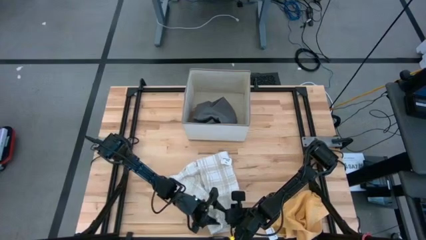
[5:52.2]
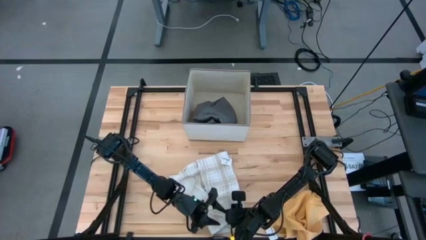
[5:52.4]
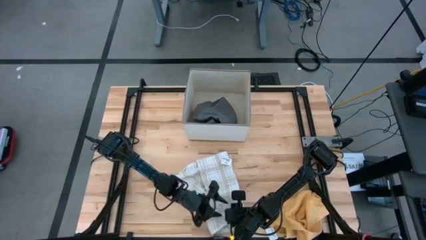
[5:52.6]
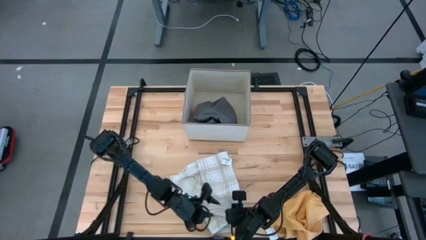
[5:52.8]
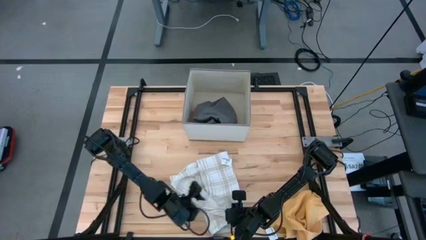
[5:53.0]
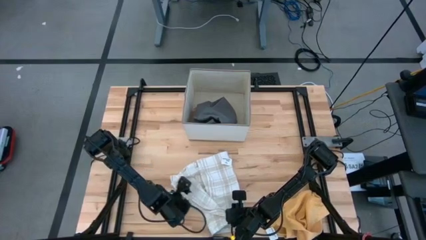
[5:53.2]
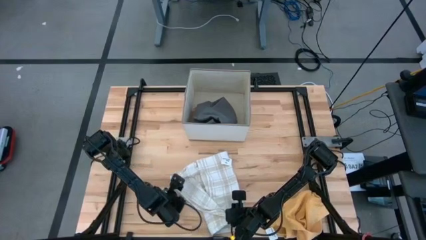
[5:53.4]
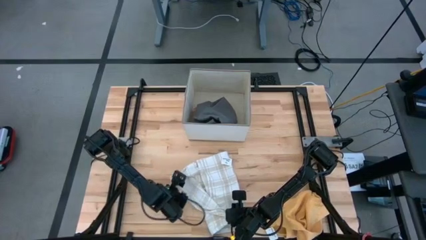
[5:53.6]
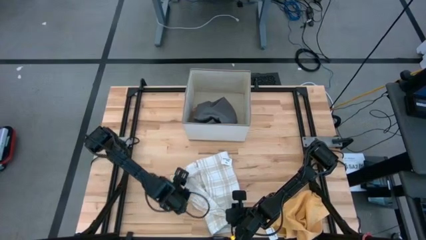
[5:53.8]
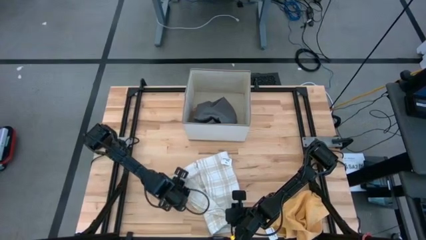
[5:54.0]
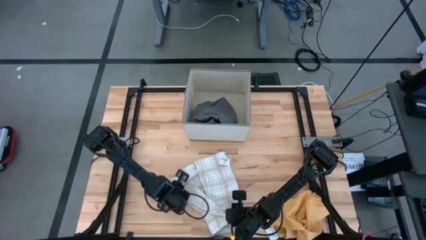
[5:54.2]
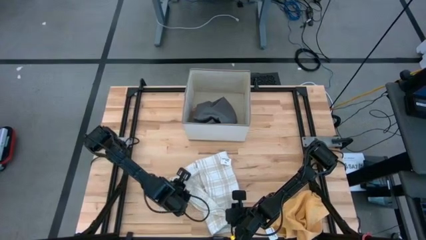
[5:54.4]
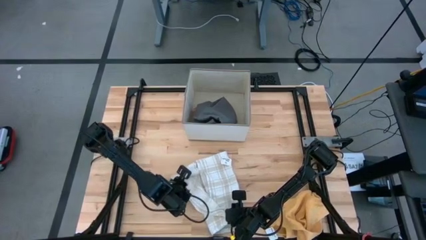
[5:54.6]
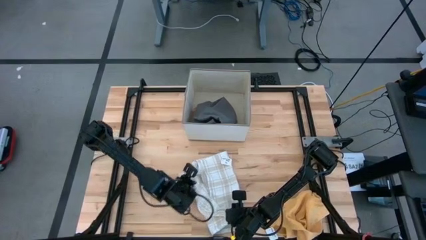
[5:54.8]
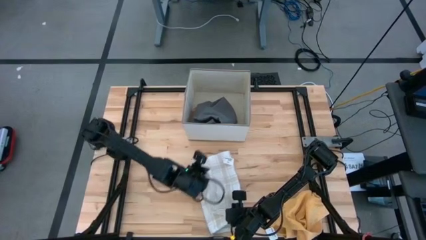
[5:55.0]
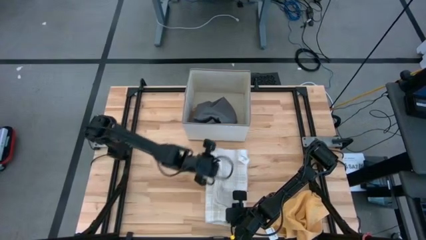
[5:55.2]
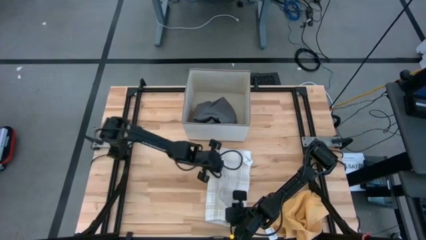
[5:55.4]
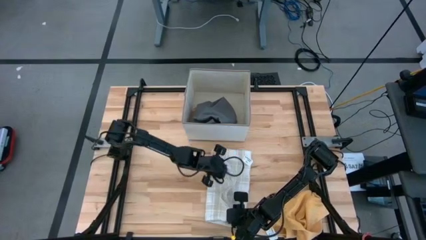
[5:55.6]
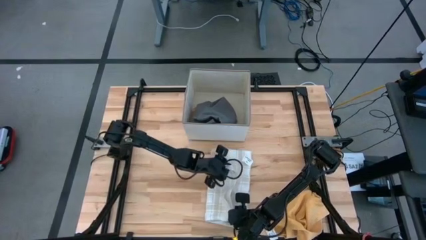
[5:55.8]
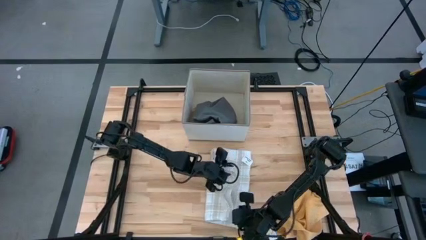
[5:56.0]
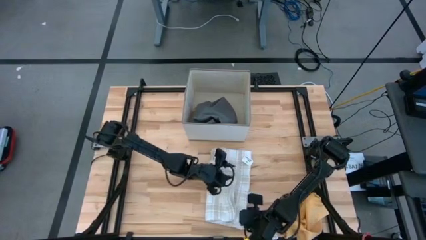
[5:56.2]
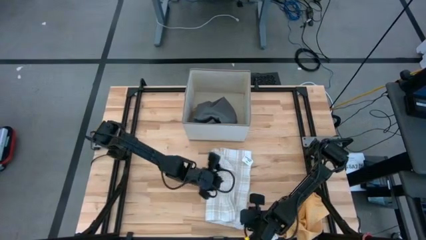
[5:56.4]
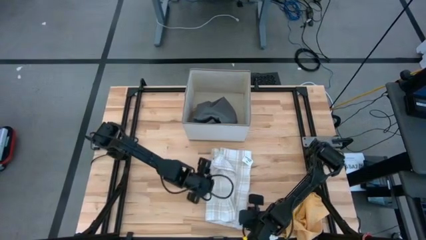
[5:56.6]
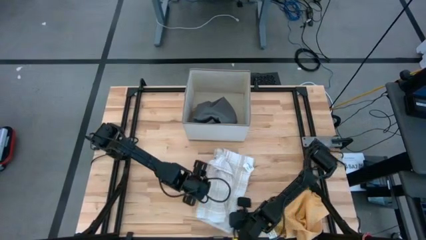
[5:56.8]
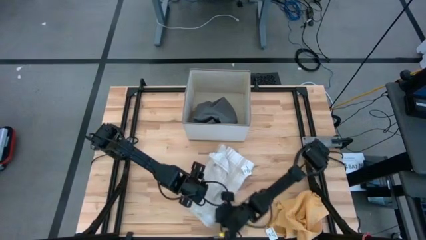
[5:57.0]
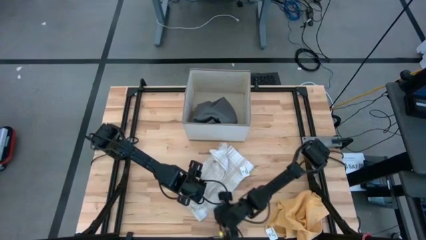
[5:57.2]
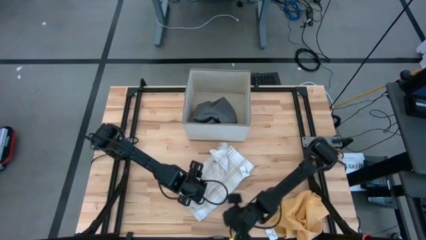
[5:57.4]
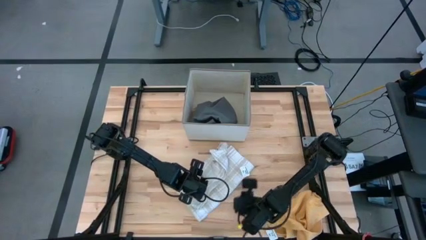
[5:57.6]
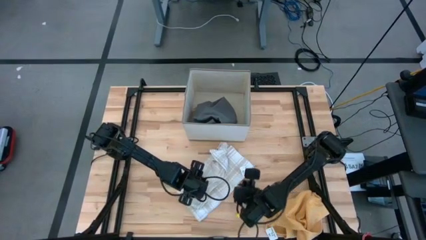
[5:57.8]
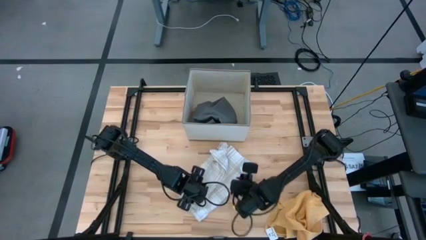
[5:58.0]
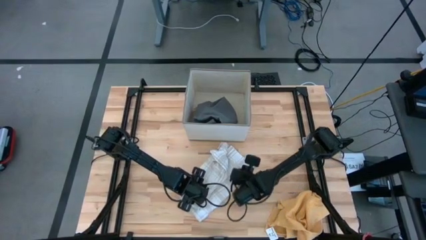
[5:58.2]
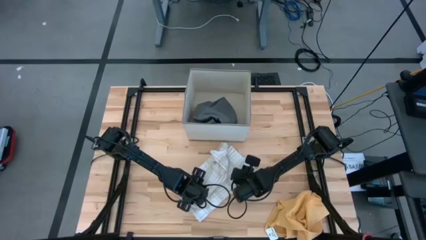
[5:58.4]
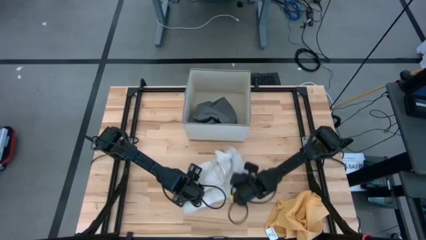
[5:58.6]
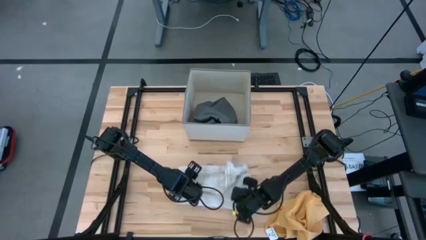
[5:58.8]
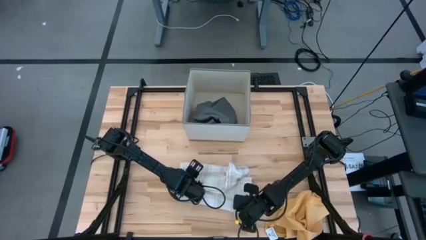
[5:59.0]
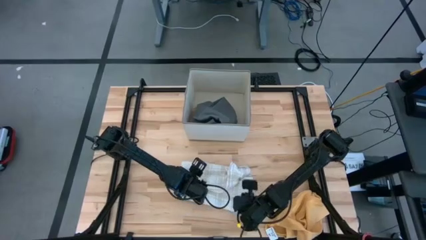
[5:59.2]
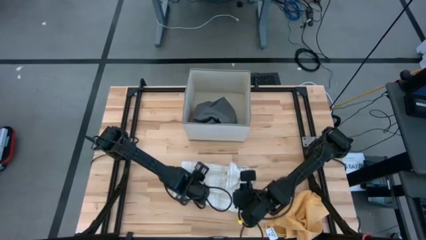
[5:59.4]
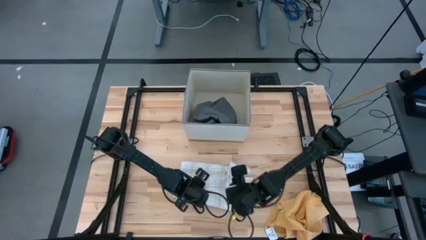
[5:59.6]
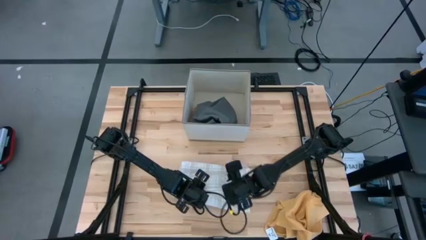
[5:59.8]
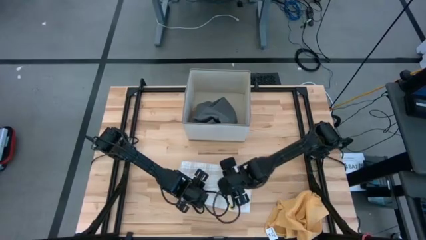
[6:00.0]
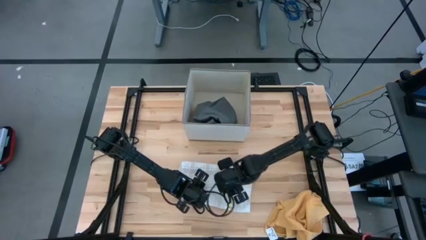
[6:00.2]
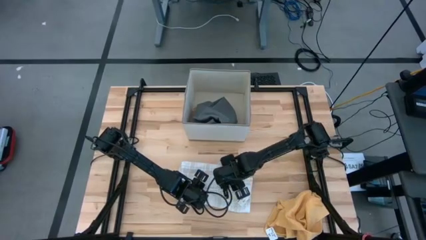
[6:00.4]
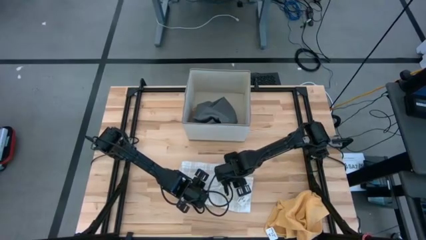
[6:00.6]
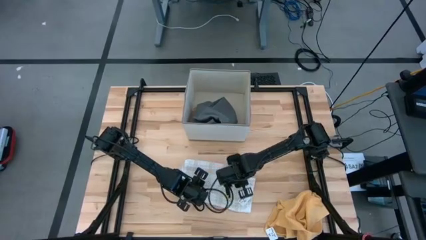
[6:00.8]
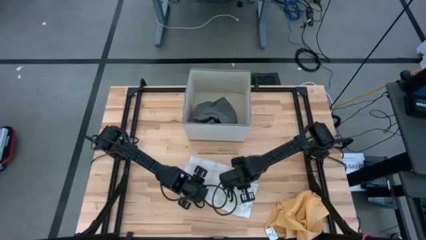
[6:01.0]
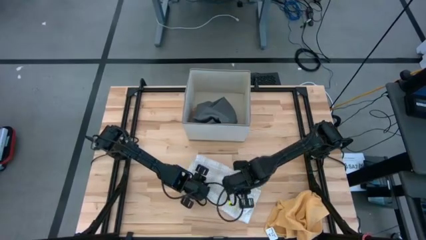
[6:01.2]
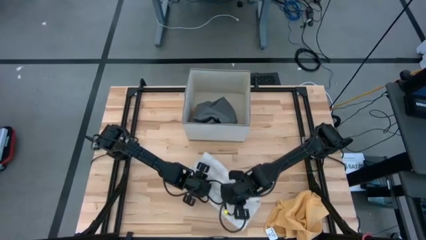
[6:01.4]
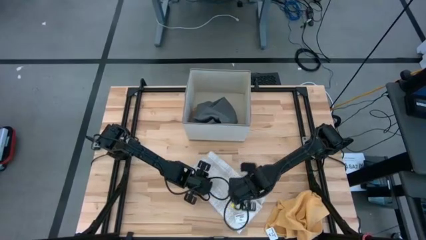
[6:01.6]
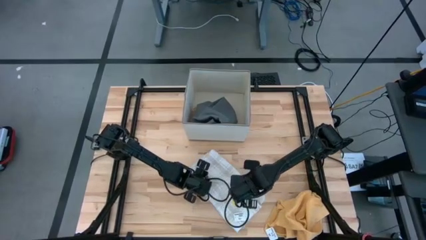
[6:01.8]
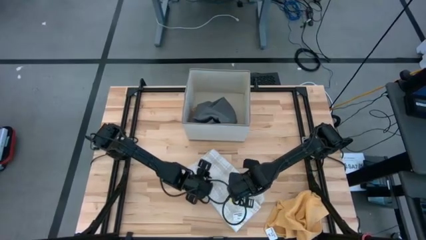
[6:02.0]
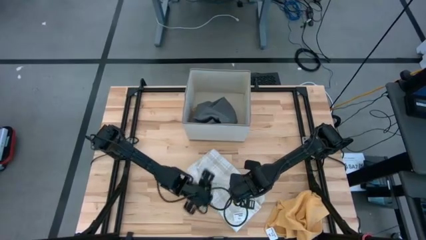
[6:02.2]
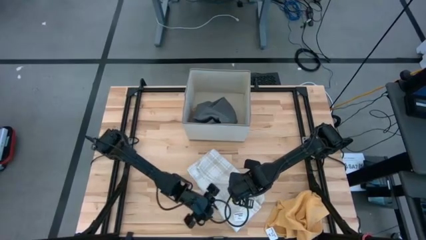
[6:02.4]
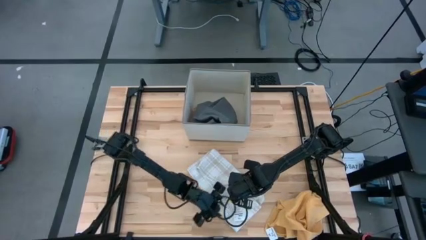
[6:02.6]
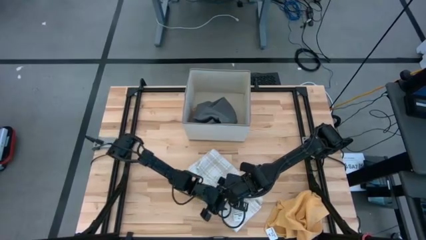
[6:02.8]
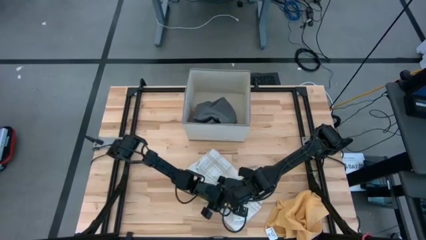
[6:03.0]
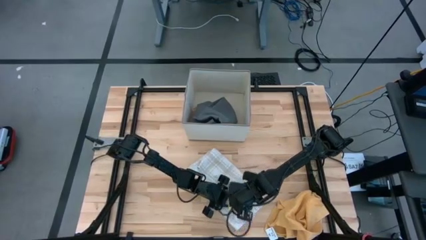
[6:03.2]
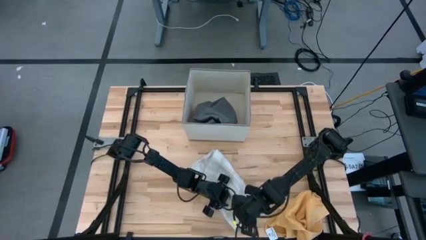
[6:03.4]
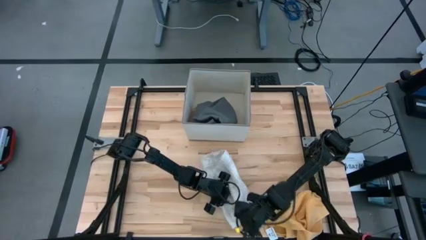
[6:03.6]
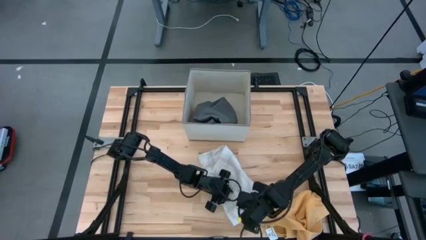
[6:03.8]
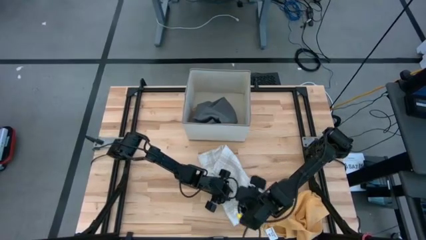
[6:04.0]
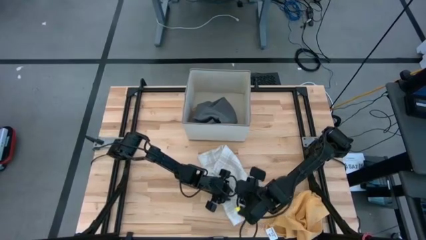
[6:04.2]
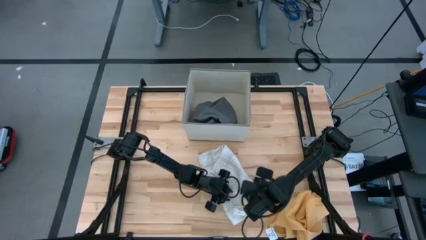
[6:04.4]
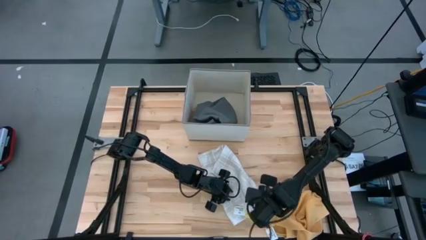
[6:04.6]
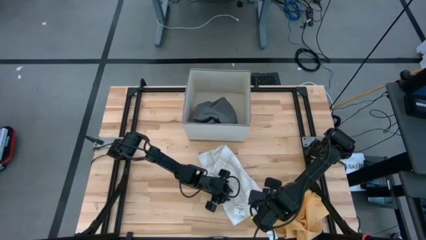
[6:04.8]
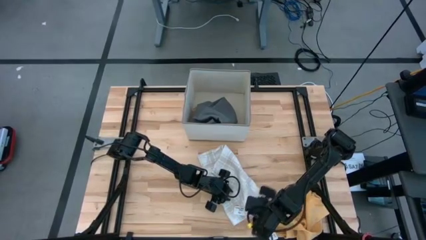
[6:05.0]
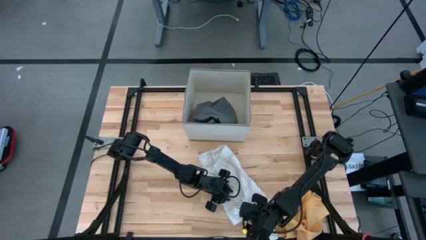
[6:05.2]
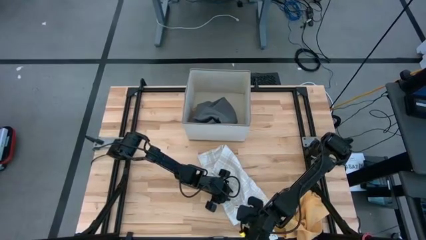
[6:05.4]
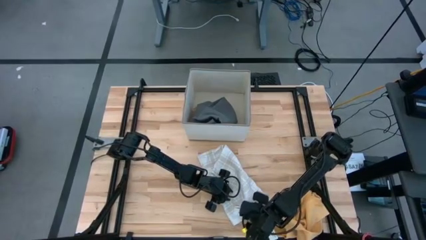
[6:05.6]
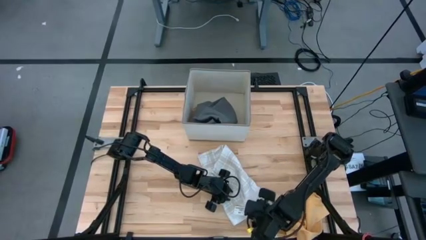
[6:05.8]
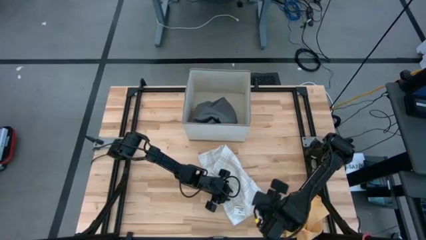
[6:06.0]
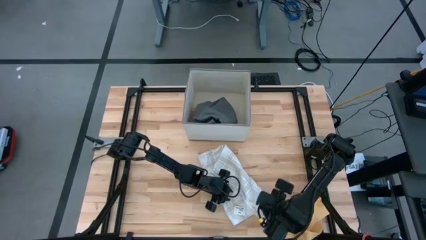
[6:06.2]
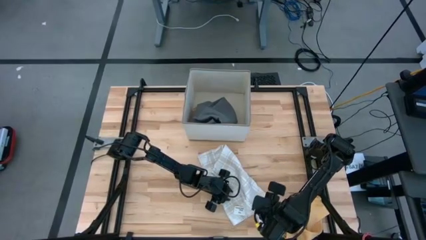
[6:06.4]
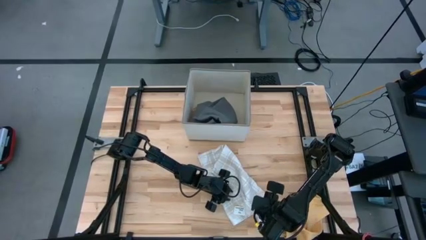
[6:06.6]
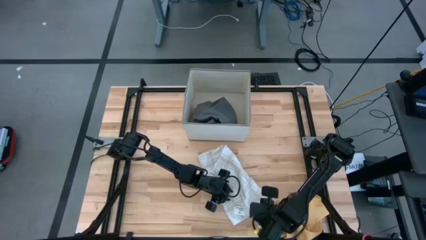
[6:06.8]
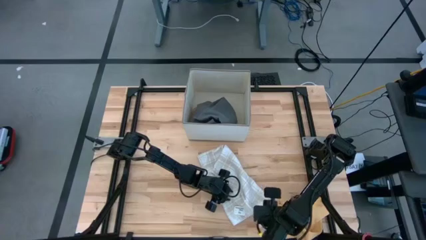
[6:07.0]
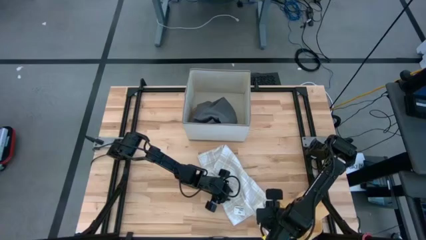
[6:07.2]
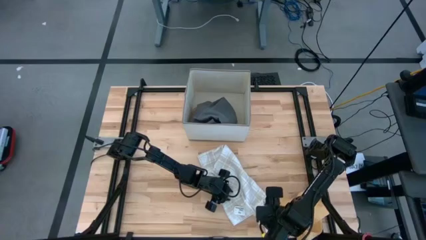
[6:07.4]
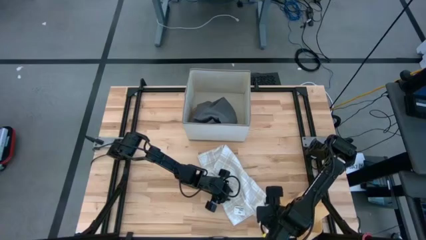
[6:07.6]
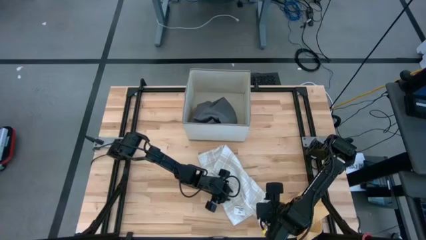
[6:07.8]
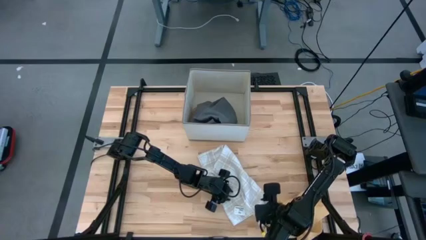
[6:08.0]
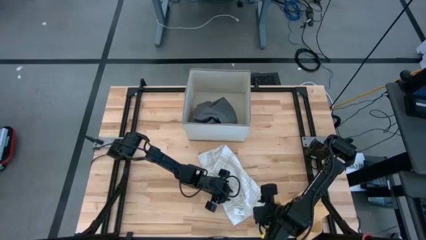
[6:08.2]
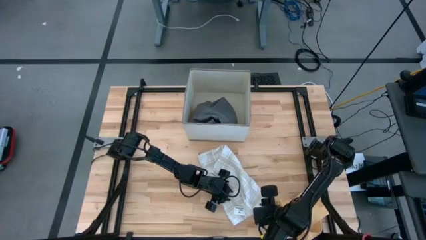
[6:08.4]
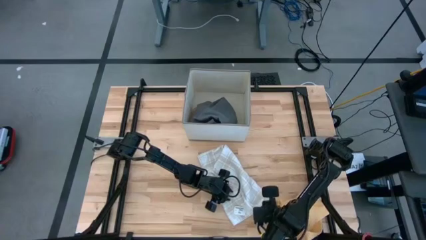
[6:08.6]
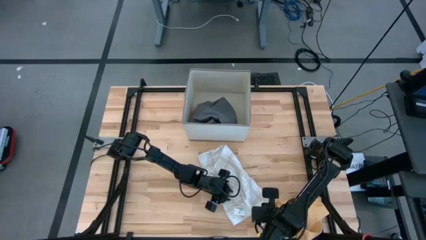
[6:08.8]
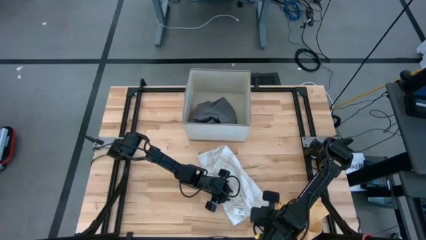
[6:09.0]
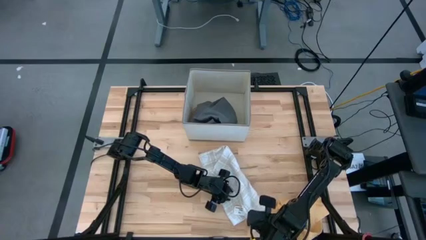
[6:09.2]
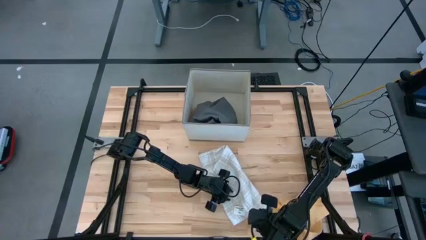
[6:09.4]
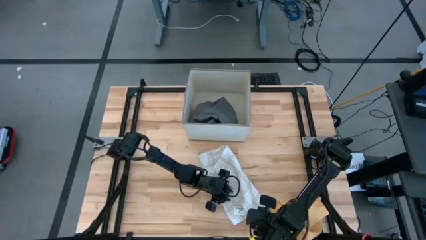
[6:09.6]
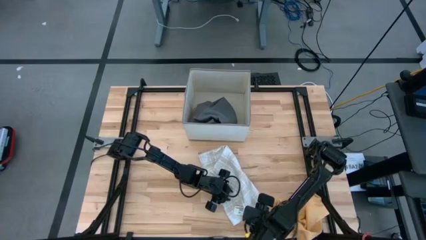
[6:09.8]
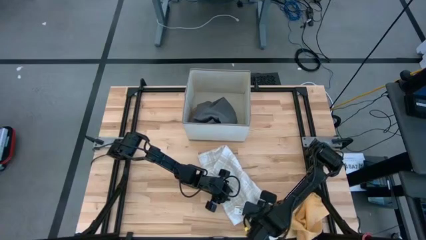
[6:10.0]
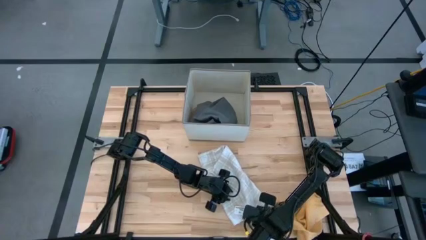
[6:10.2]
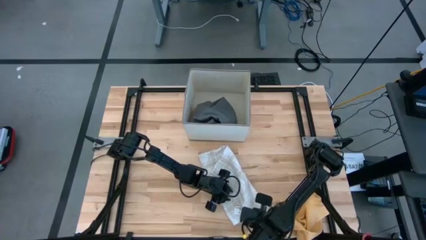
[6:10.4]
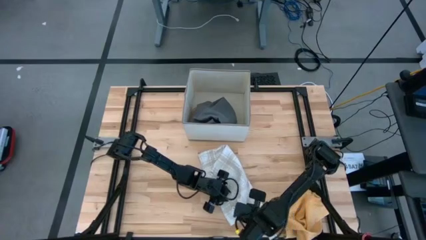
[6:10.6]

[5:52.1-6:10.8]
Task: Fold towel
Fold the white patterned towel
